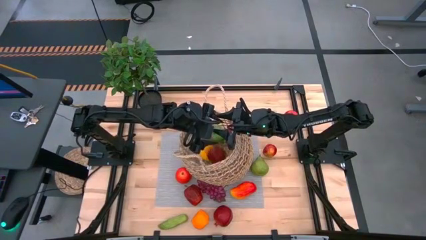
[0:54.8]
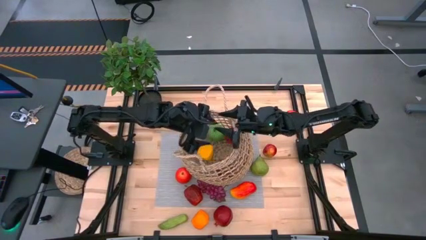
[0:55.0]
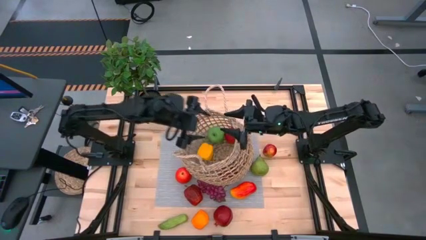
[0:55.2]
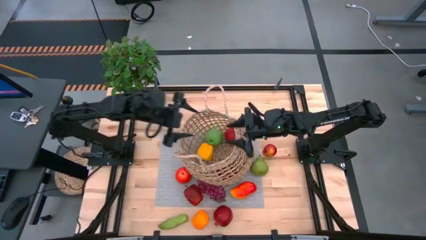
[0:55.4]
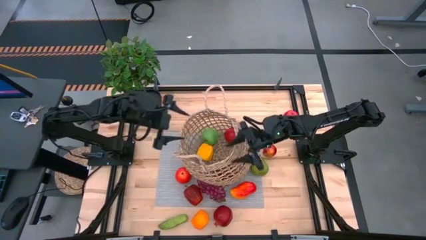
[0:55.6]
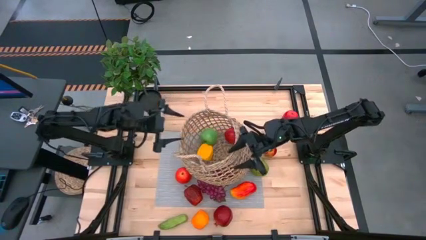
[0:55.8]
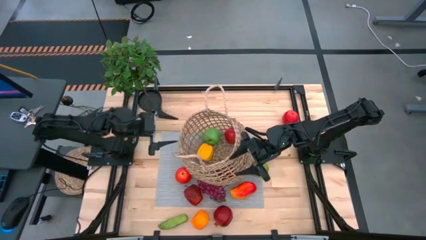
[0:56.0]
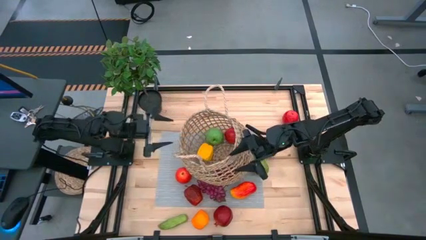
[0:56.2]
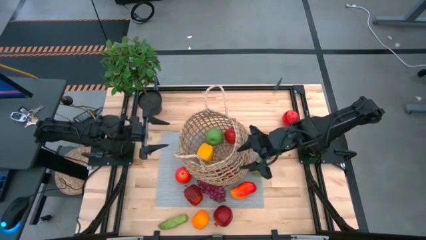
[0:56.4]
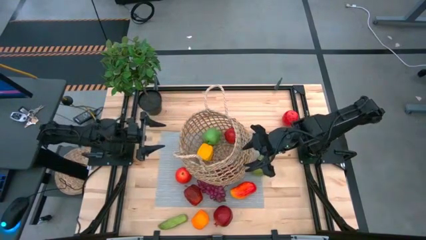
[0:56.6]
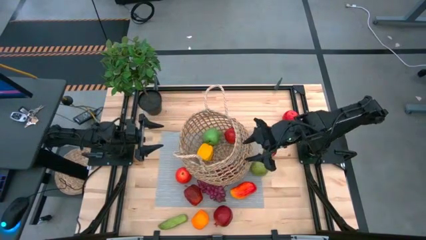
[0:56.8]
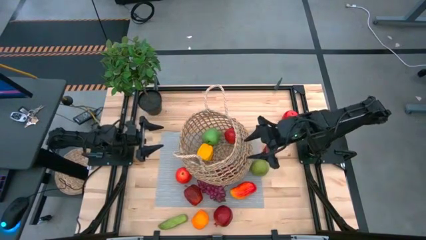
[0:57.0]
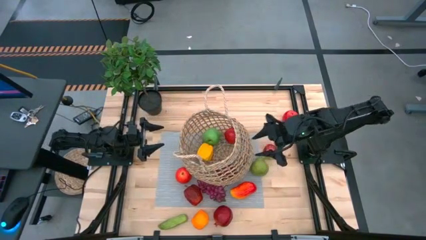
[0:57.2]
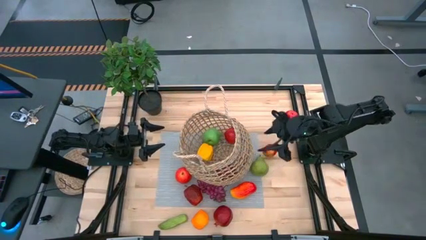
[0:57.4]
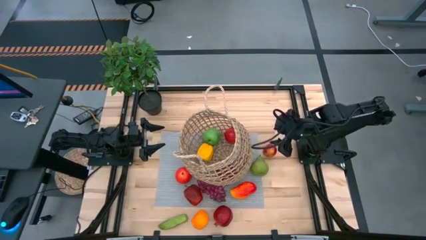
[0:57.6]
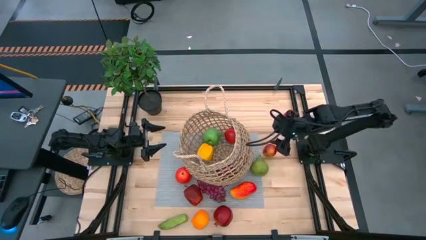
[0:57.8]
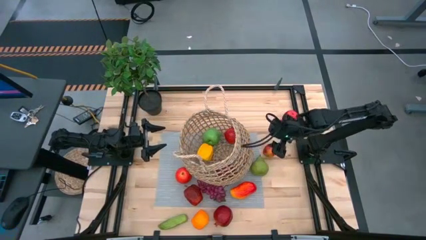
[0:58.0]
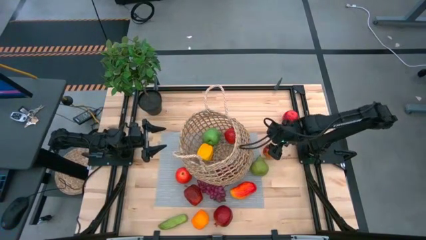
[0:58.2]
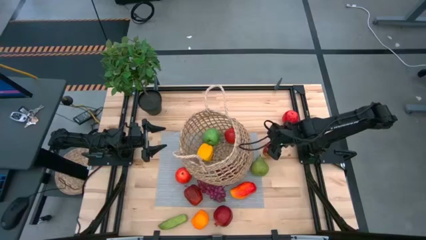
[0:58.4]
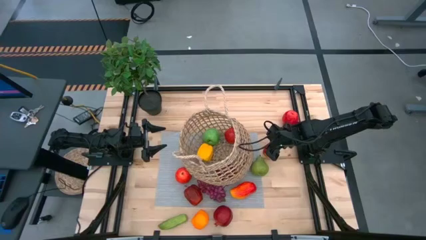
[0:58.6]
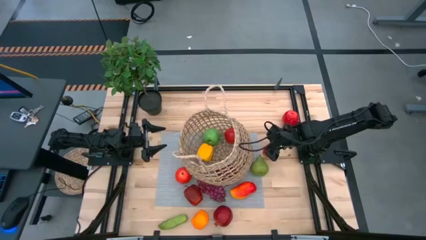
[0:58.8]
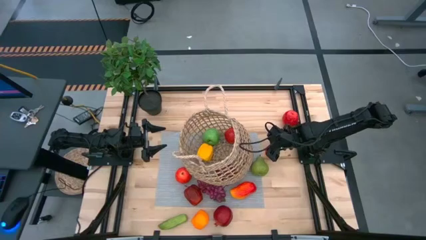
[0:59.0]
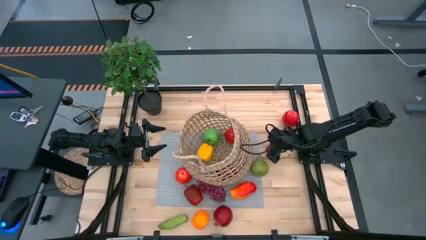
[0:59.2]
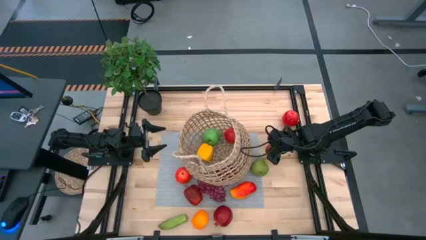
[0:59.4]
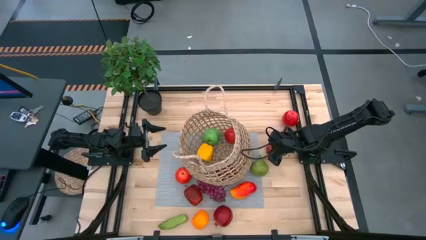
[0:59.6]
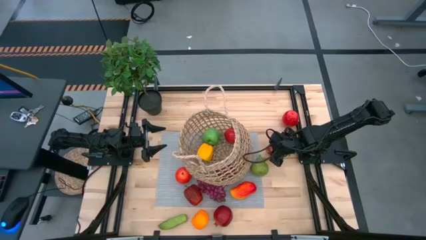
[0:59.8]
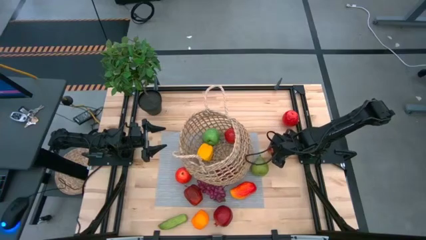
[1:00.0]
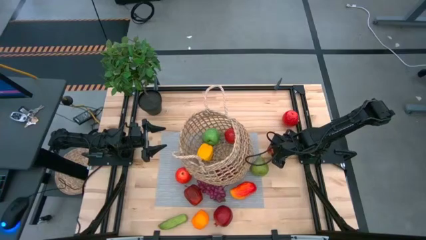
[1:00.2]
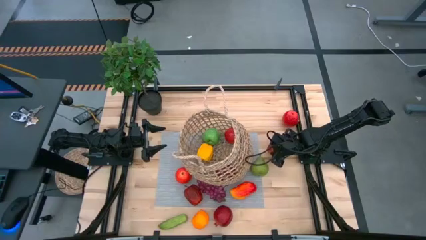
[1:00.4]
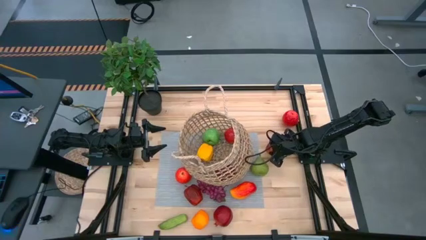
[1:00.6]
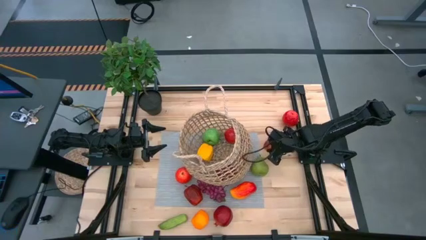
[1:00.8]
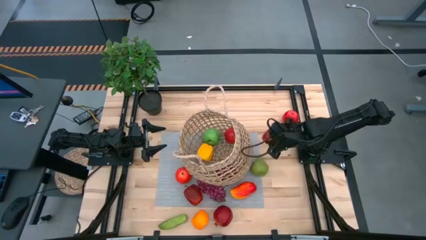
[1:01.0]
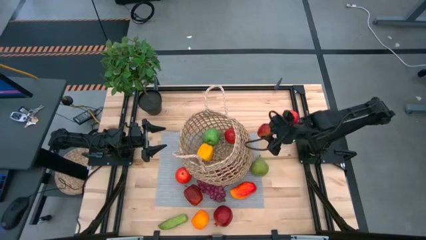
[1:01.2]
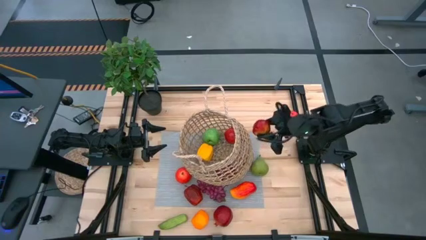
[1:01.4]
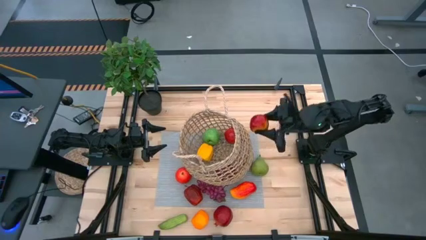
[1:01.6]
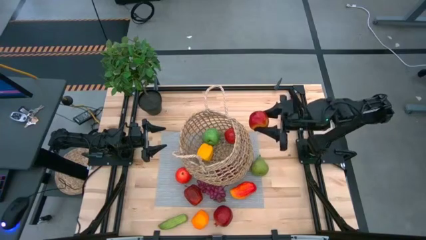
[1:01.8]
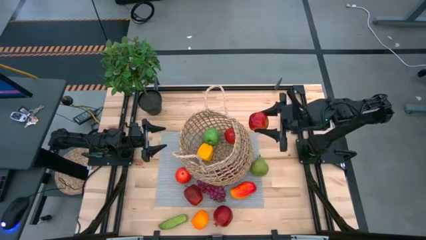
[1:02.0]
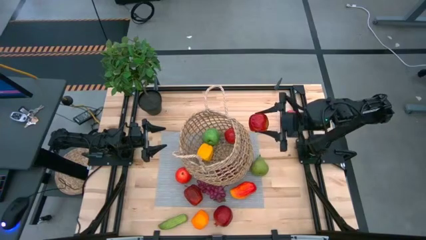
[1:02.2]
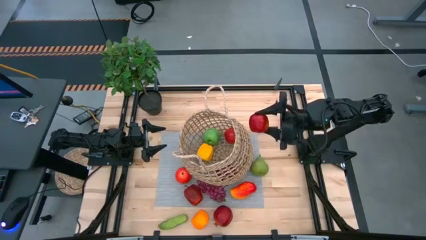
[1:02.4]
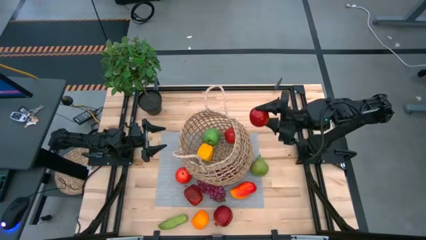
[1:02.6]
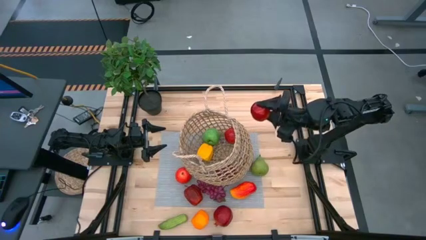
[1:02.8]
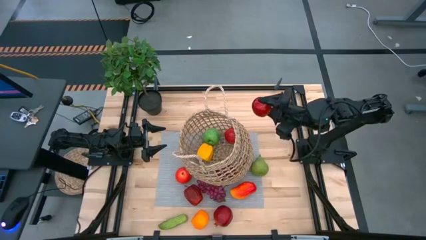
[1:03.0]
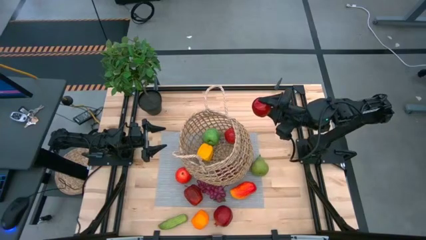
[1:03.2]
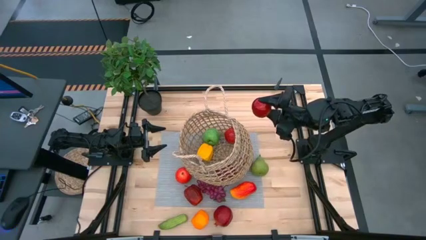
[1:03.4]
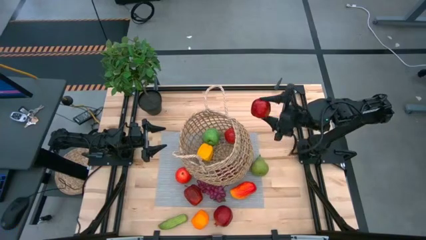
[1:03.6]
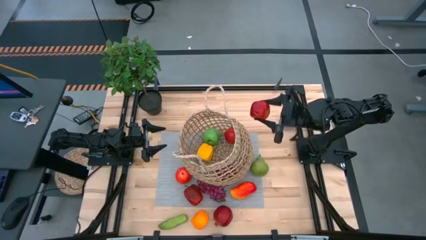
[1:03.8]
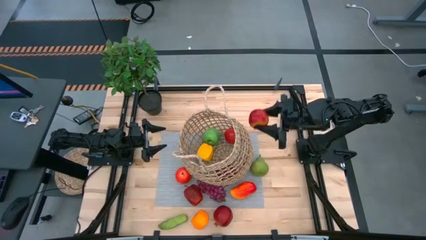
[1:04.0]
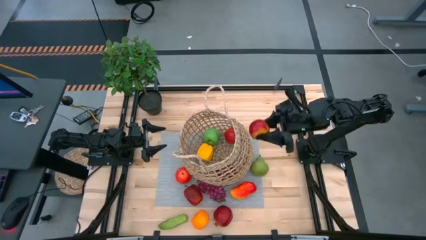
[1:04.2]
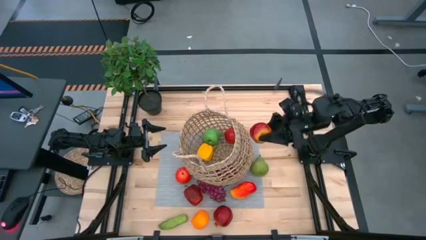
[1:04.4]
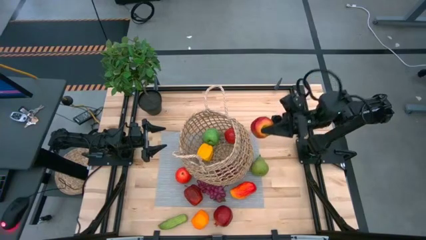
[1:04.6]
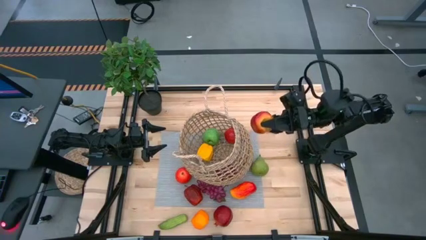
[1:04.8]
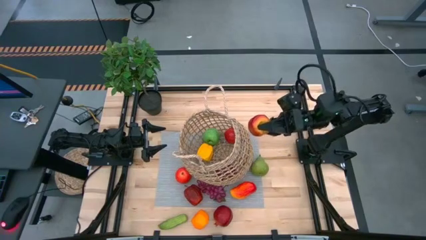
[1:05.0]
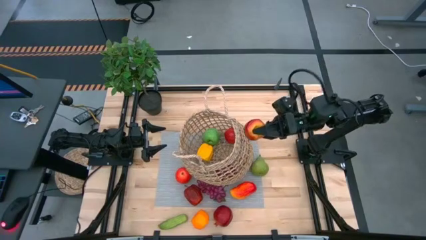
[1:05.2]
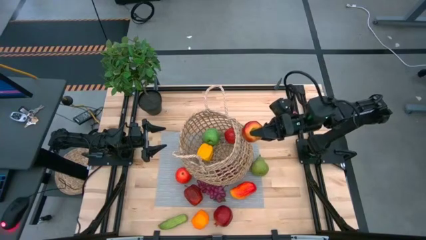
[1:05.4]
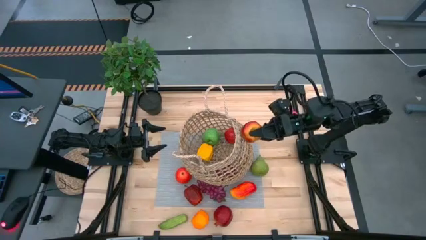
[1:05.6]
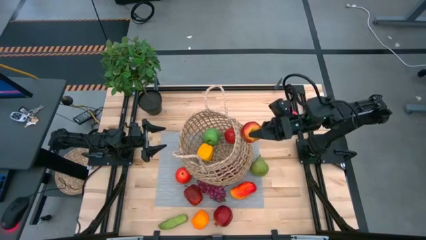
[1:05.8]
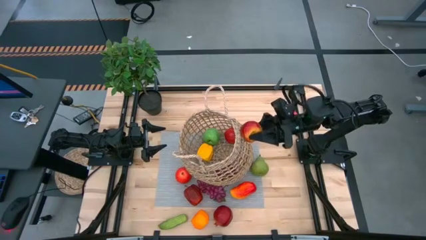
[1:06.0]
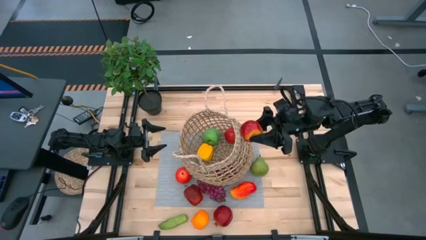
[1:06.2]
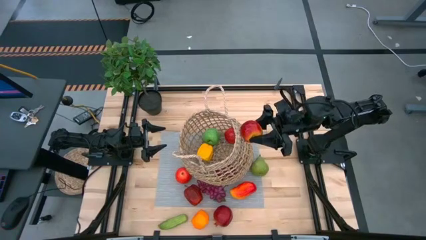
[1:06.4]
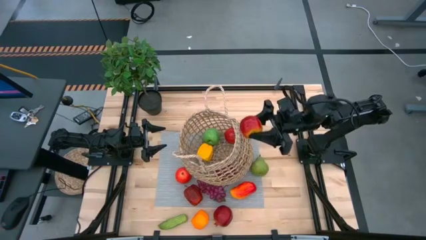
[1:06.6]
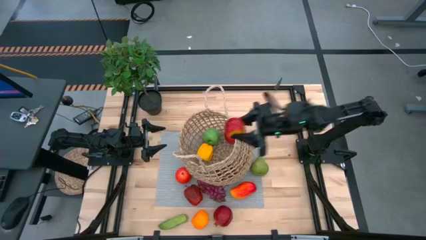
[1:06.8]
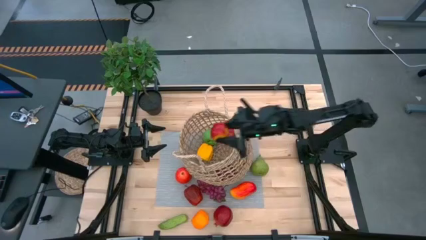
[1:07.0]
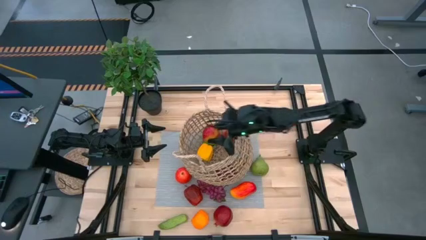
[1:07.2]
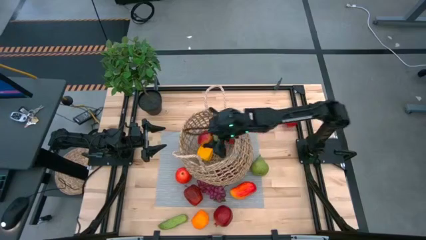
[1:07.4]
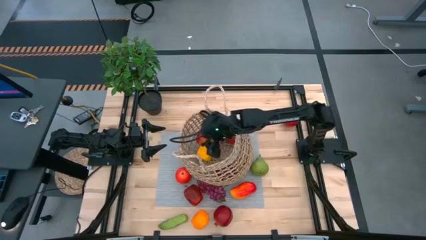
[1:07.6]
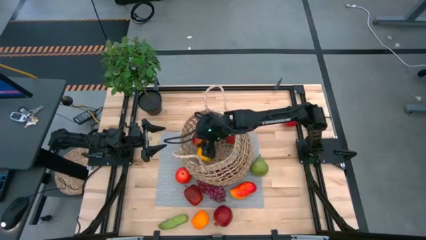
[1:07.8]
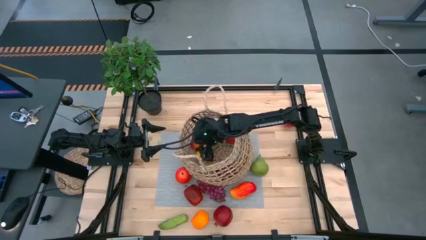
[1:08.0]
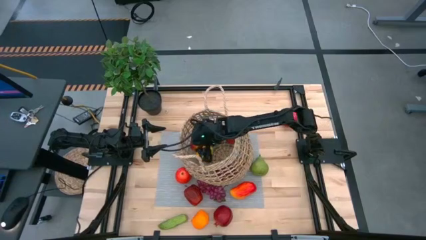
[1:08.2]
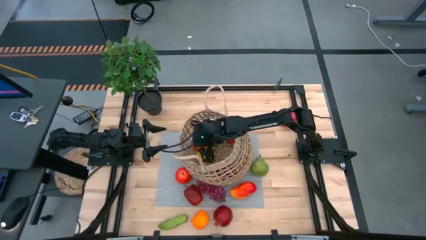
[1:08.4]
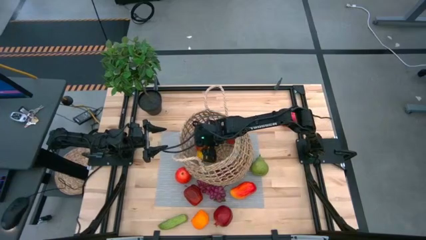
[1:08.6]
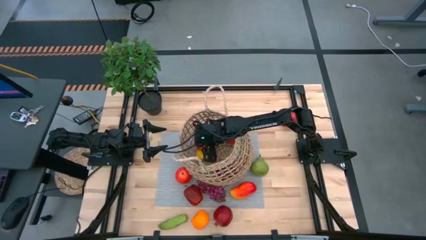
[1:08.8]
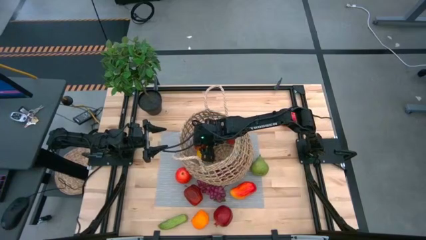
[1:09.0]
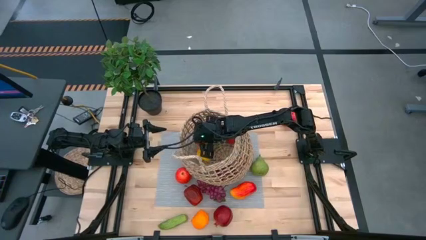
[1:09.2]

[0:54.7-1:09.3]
Task: Build produce basket
Put the red apple into the basket

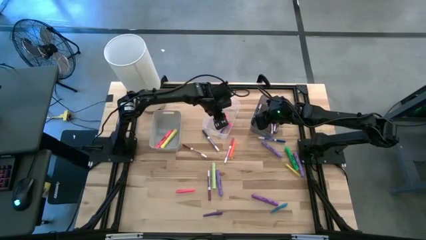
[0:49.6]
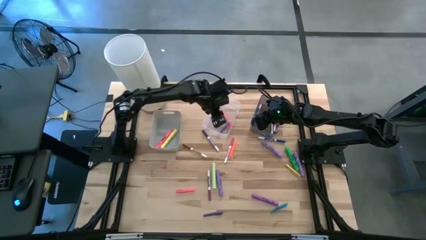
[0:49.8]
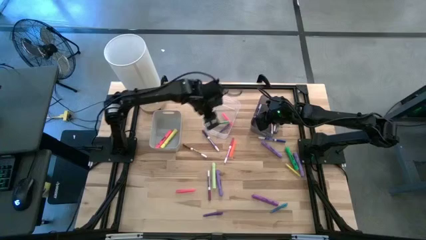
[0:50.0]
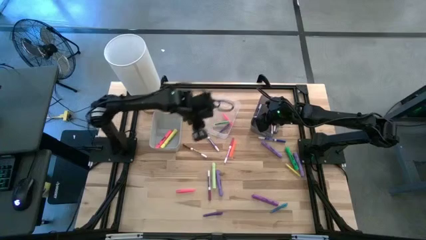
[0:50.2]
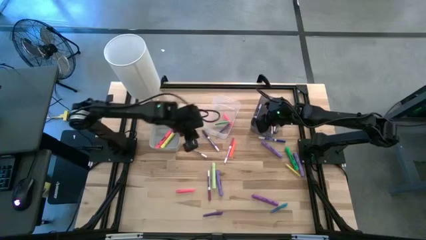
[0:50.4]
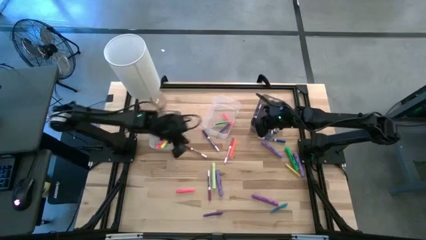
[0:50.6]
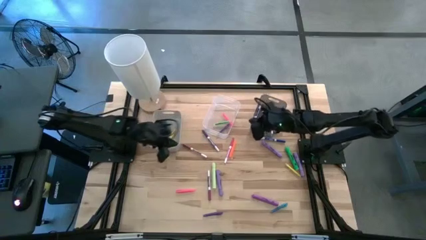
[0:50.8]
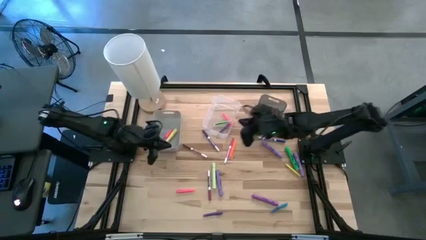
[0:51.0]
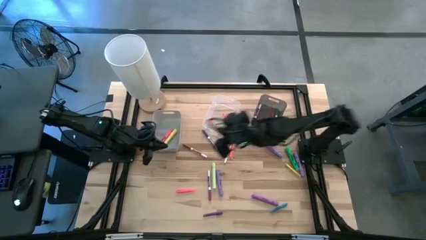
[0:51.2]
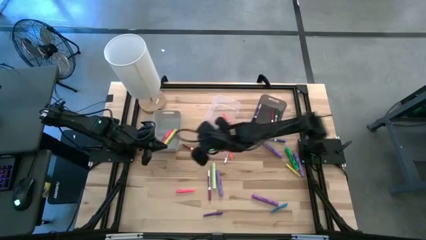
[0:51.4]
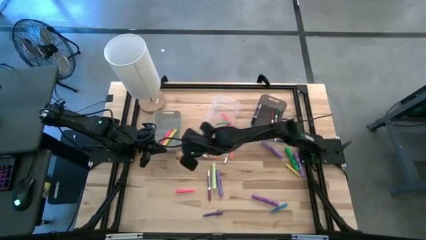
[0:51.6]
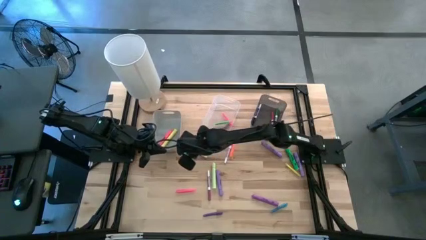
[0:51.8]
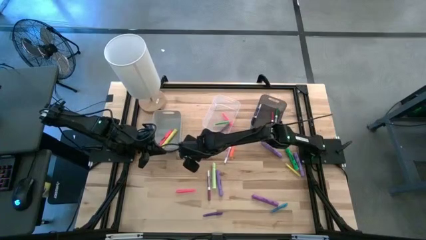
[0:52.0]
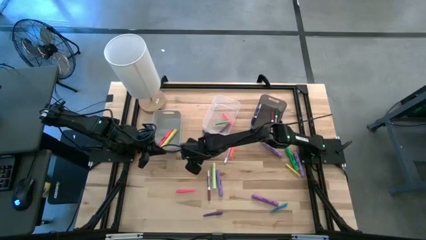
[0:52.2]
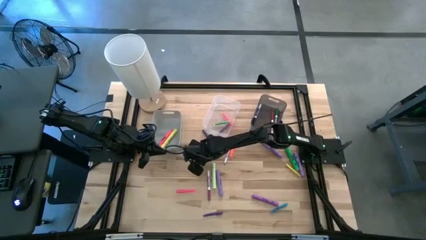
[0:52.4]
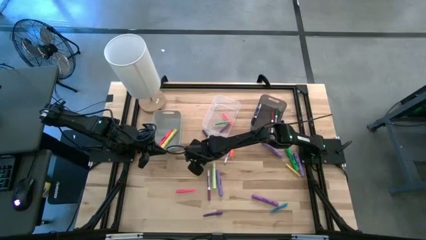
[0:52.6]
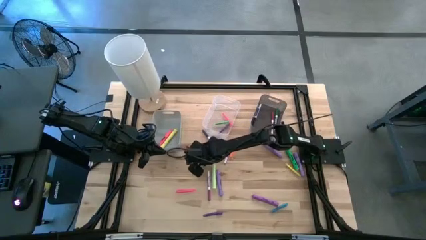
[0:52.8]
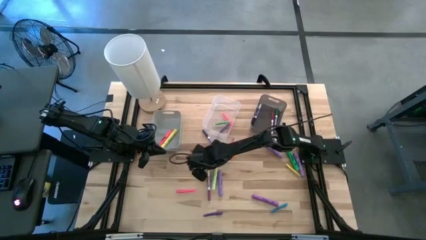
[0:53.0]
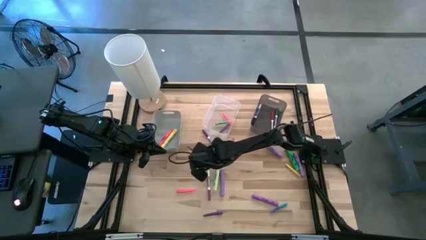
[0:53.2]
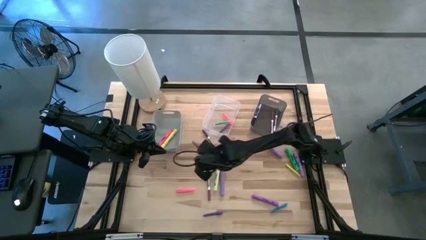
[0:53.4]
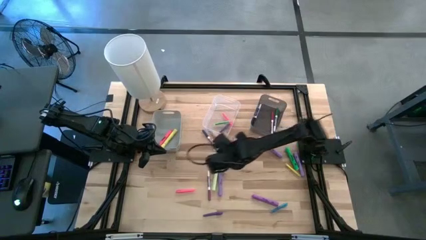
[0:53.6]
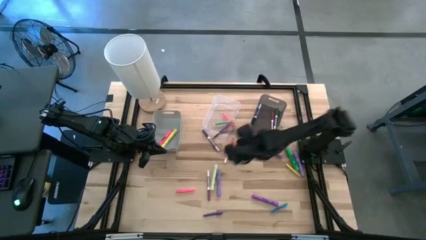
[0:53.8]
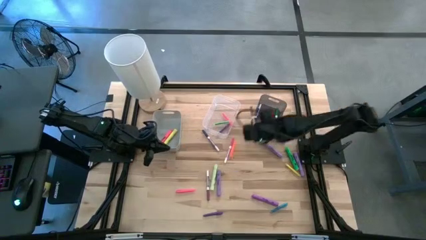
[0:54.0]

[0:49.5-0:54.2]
Task: Pick & Place Markers
Put the brown marker into the black bin
